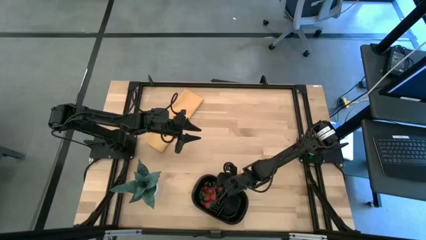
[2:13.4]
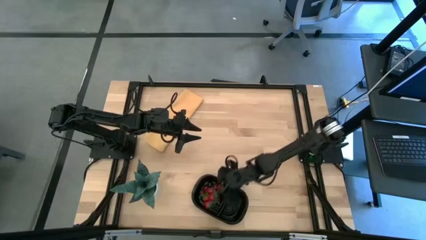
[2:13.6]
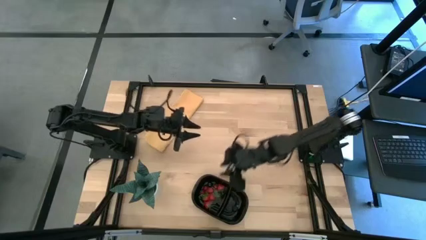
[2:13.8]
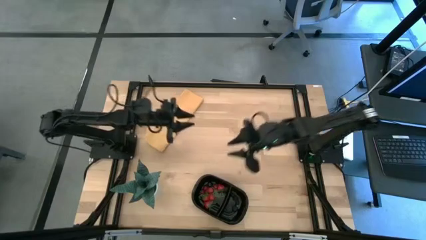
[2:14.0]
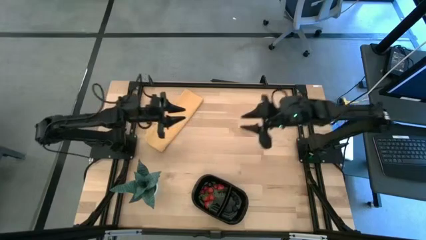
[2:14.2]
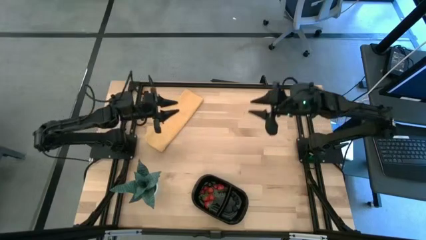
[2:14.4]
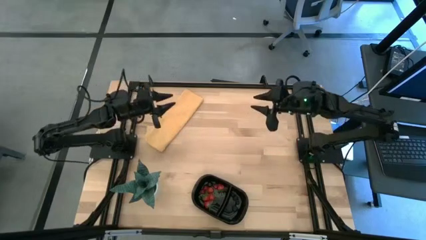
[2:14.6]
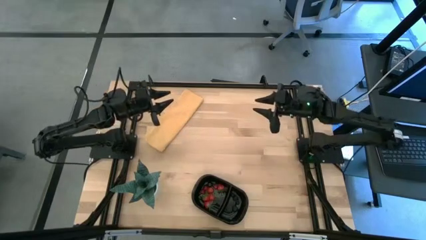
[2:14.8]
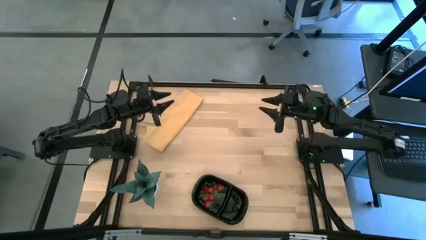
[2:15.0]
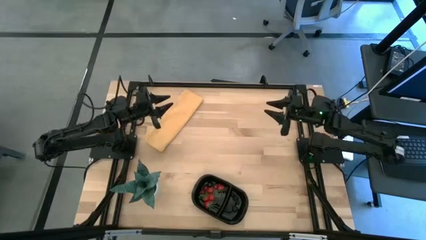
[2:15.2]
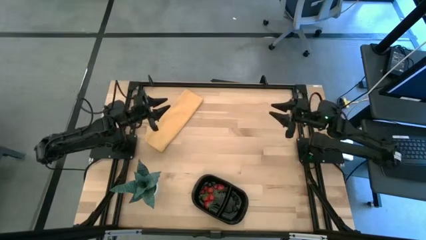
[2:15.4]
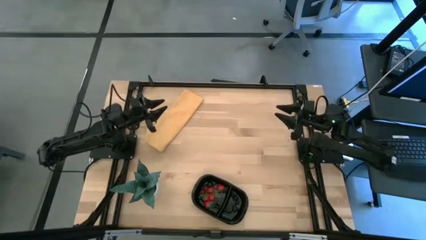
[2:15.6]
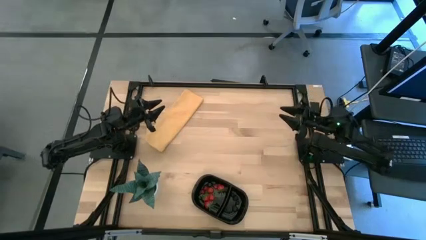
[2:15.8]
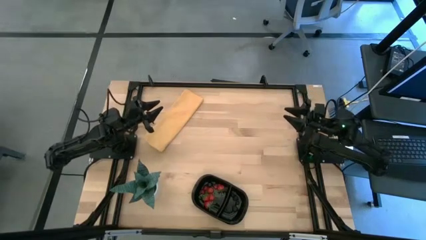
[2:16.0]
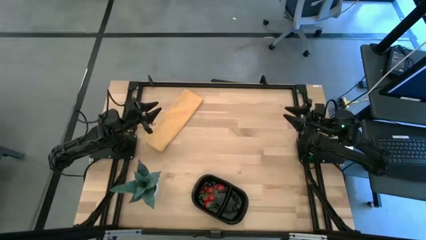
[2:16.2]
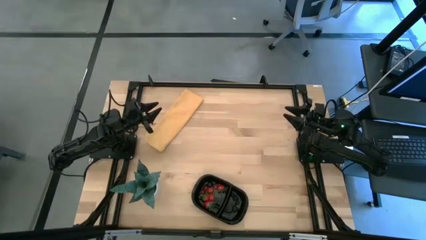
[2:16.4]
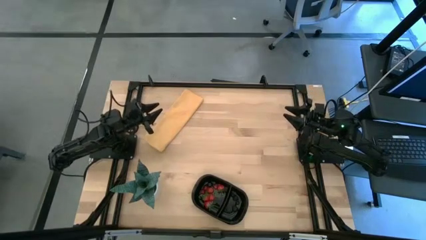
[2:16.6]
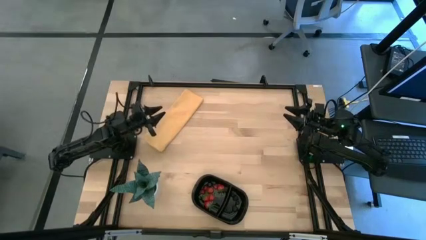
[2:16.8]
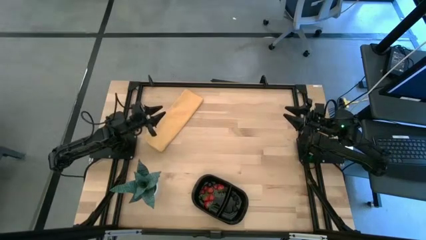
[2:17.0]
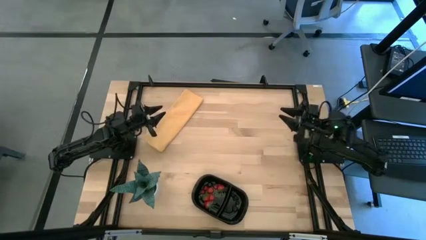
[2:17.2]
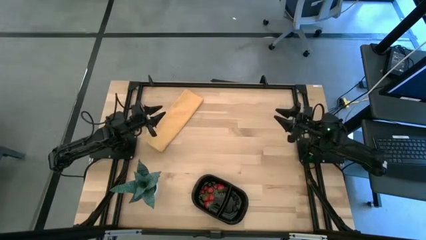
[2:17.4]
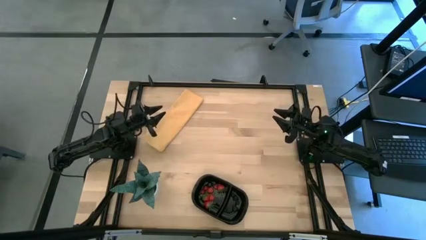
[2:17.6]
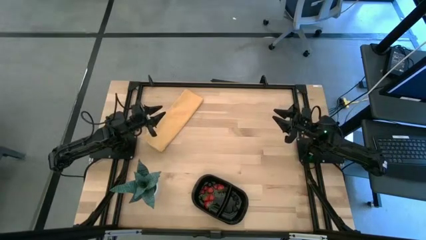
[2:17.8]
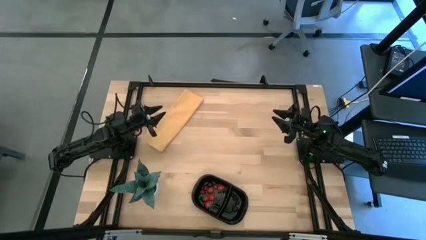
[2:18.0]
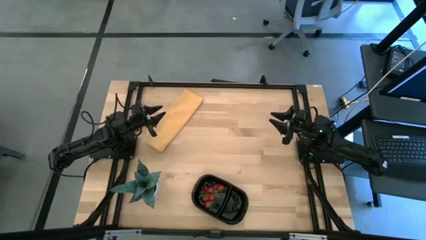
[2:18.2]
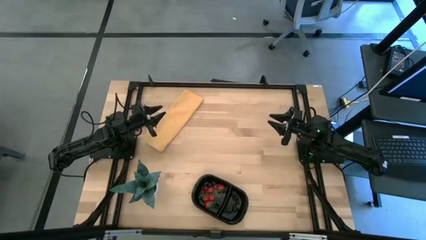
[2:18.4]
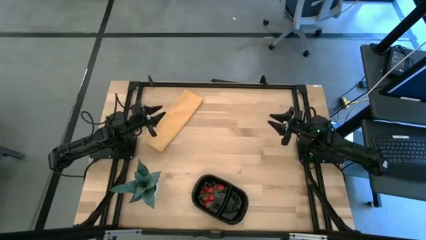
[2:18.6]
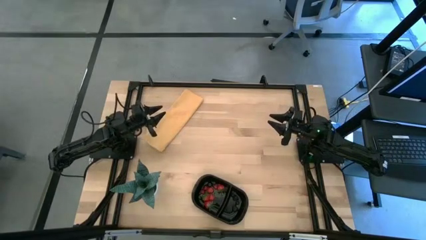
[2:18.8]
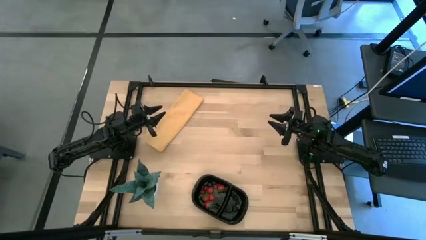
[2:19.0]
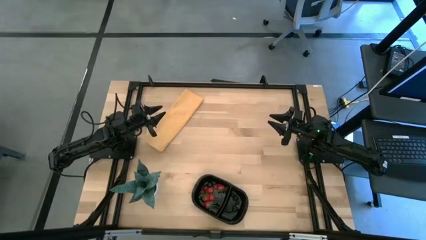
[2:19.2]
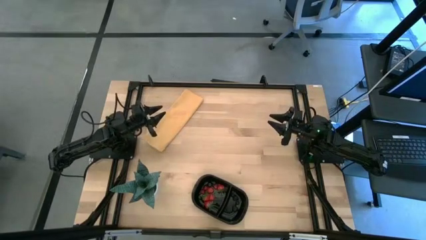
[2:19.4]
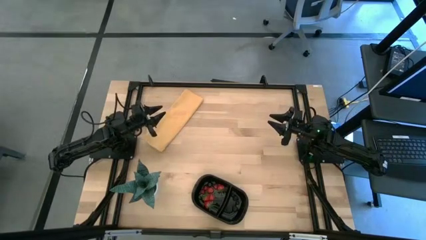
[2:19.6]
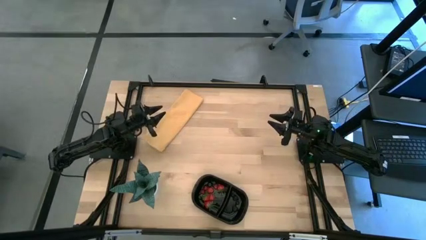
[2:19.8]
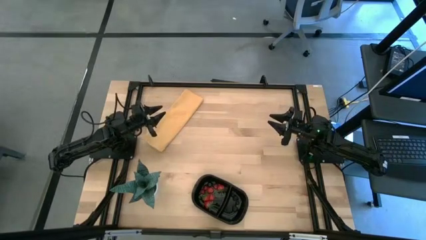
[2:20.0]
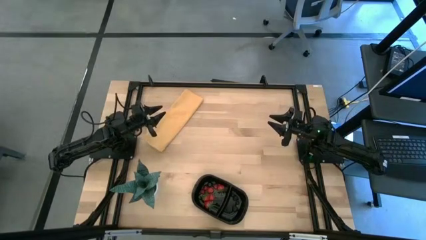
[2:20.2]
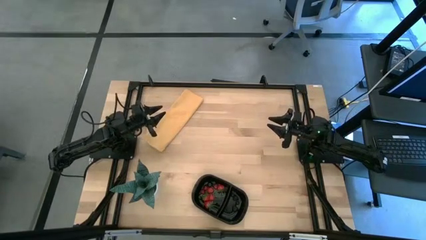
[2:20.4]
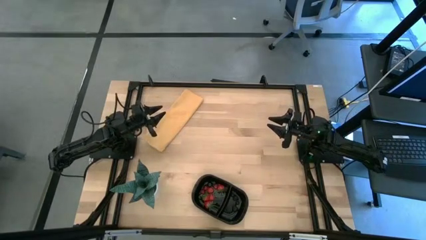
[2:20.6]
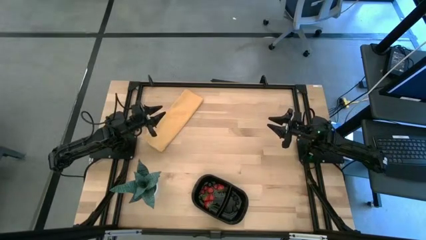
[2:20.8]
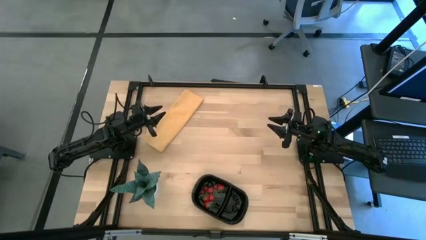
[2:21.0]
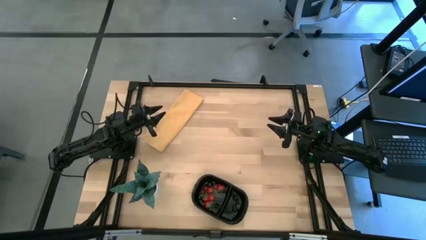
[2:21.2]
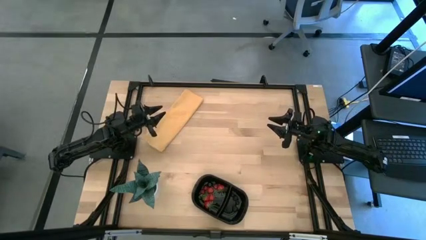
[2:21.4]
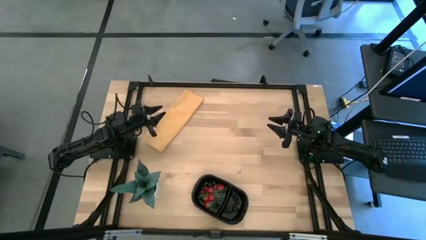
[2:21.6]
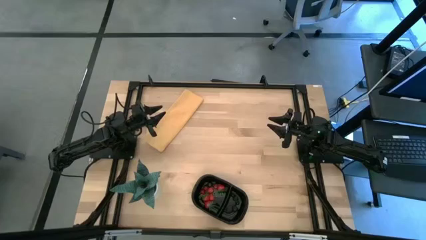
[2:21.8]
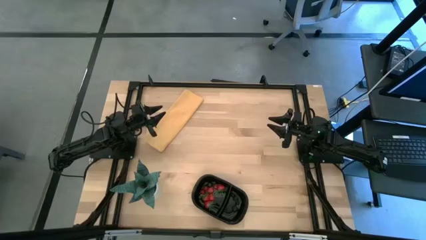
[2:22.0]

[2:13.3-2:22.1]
Task: Pick and placing Produce into tupperware
Return to Home Position

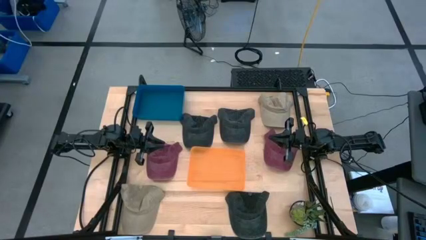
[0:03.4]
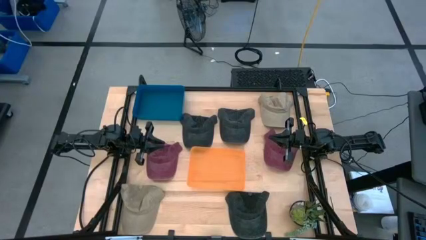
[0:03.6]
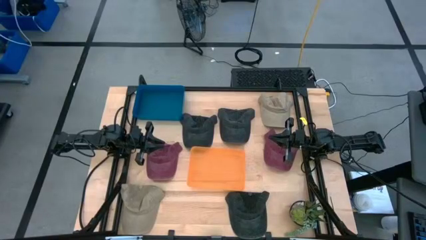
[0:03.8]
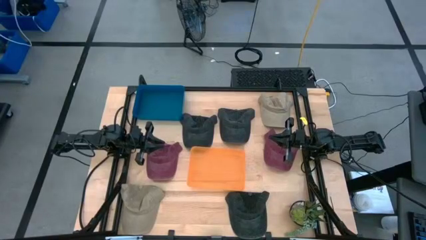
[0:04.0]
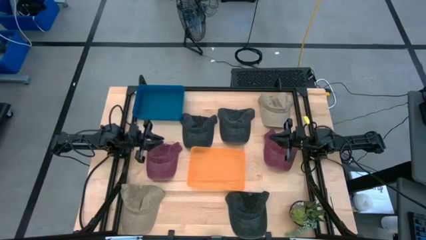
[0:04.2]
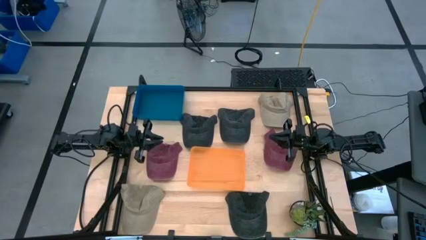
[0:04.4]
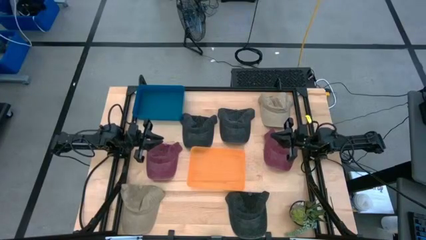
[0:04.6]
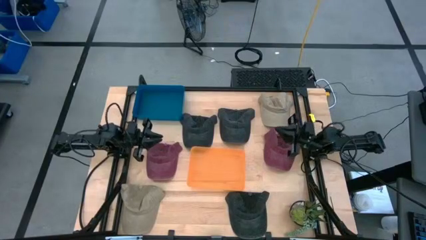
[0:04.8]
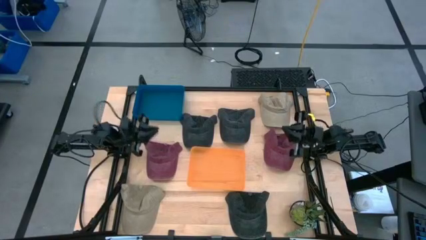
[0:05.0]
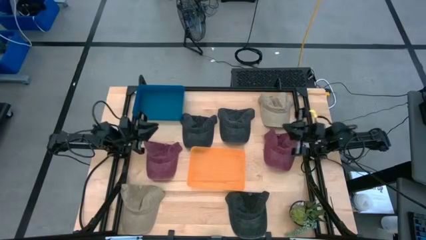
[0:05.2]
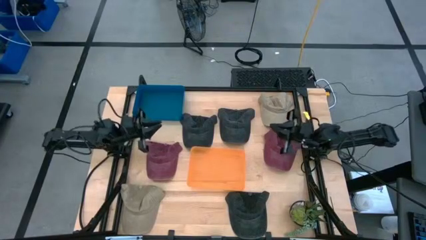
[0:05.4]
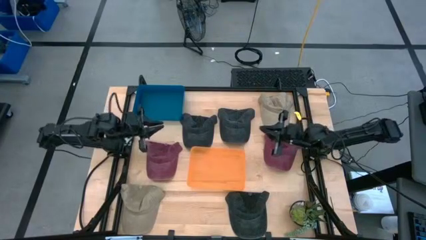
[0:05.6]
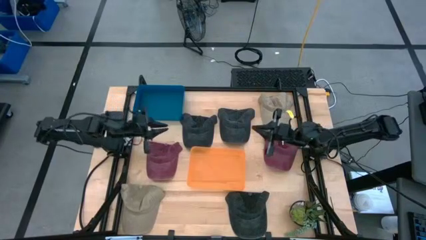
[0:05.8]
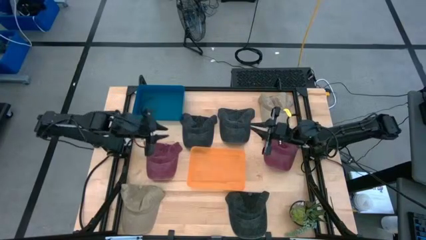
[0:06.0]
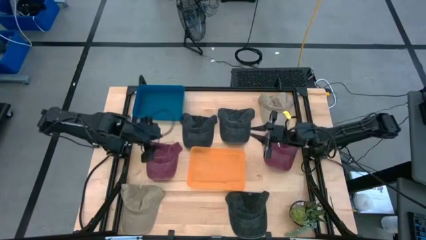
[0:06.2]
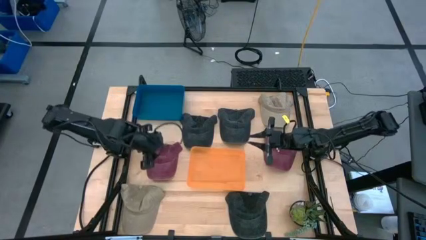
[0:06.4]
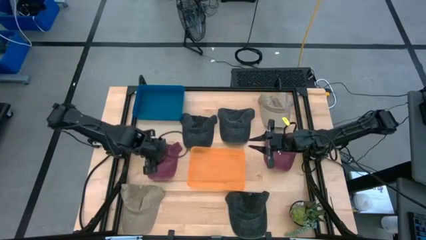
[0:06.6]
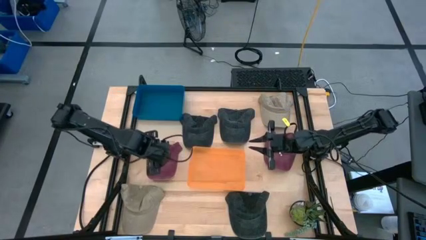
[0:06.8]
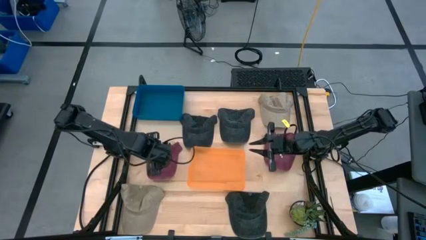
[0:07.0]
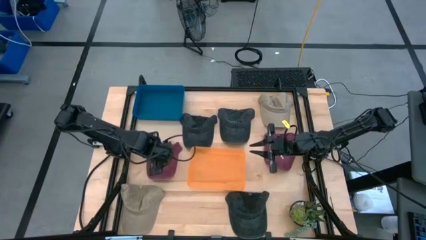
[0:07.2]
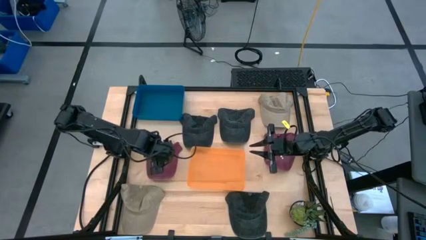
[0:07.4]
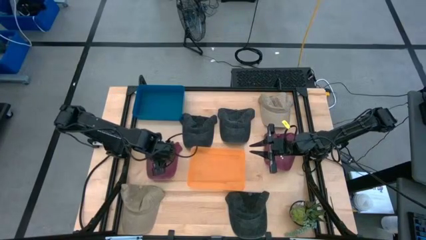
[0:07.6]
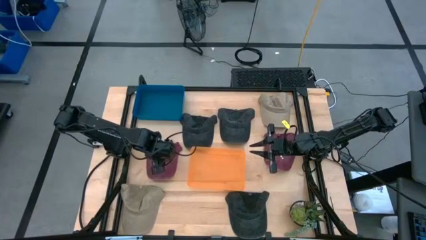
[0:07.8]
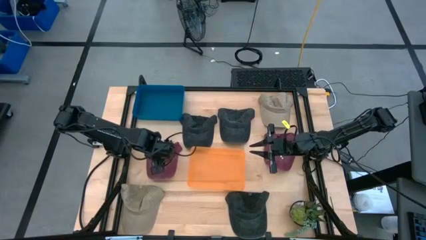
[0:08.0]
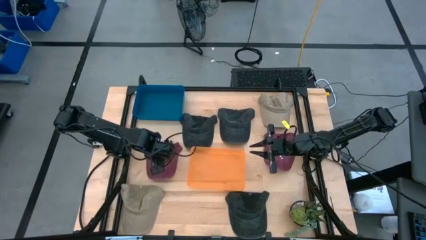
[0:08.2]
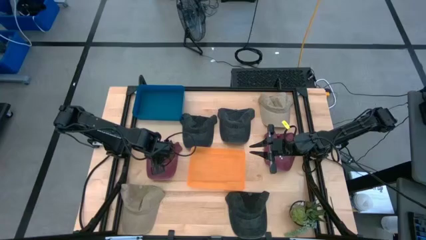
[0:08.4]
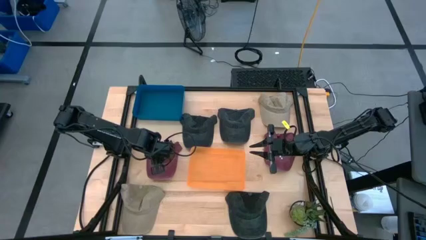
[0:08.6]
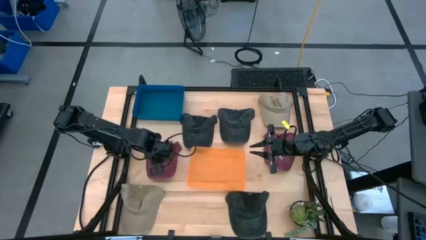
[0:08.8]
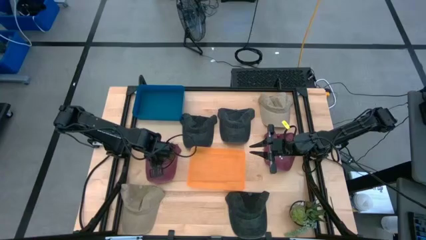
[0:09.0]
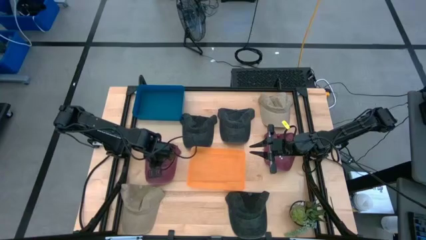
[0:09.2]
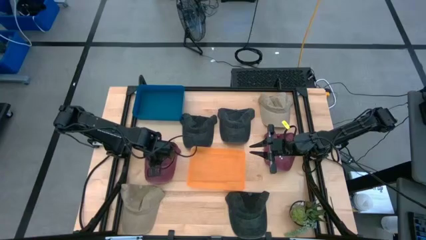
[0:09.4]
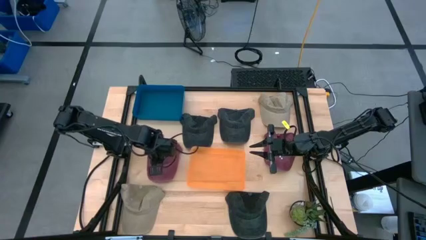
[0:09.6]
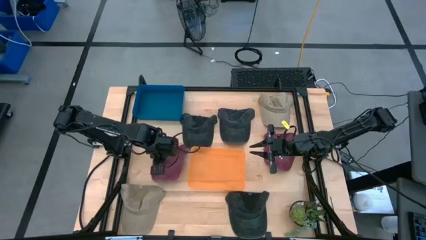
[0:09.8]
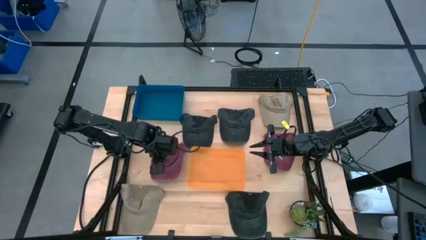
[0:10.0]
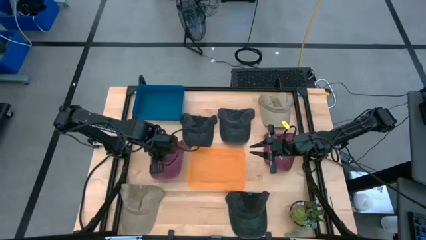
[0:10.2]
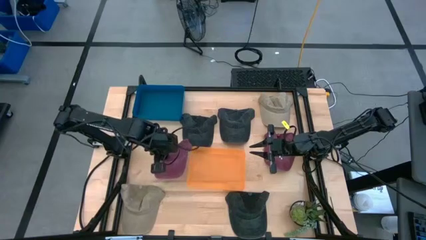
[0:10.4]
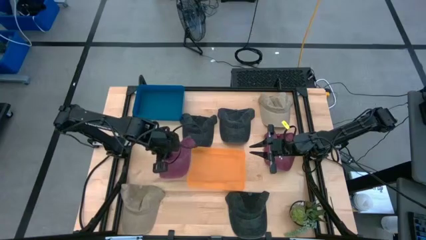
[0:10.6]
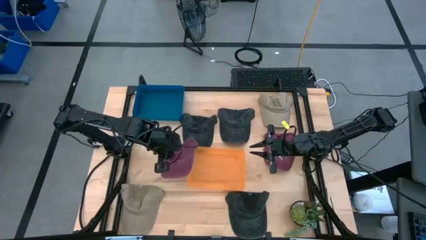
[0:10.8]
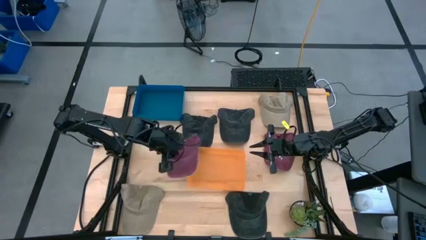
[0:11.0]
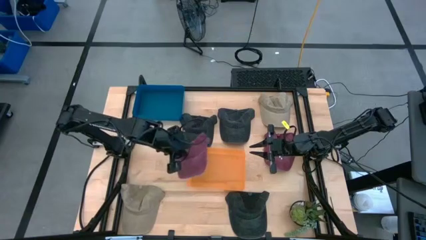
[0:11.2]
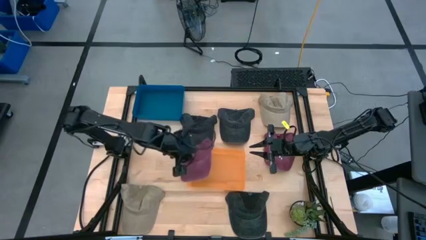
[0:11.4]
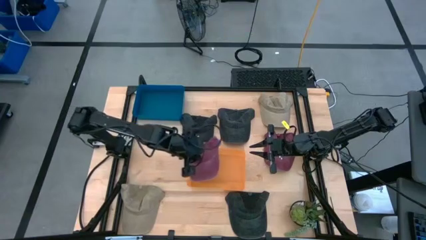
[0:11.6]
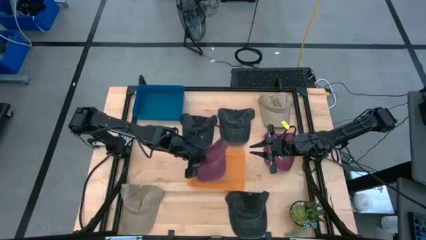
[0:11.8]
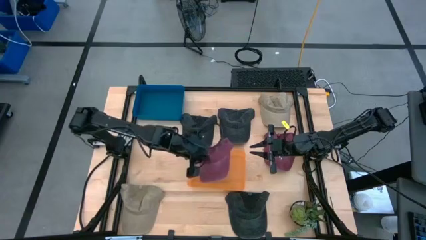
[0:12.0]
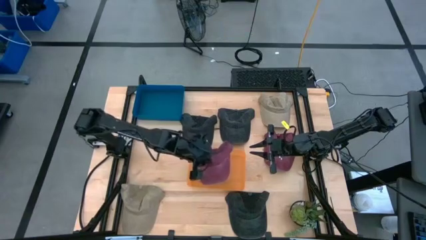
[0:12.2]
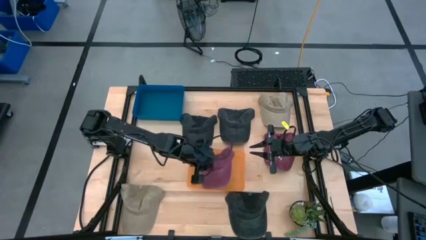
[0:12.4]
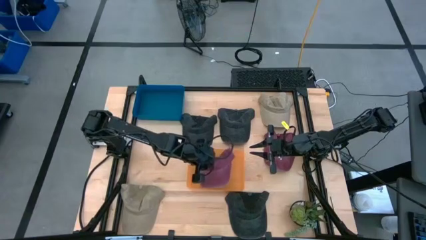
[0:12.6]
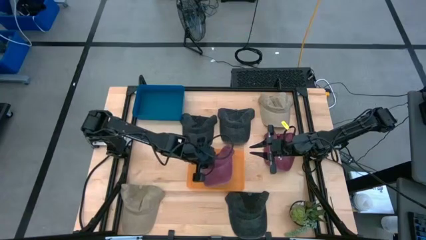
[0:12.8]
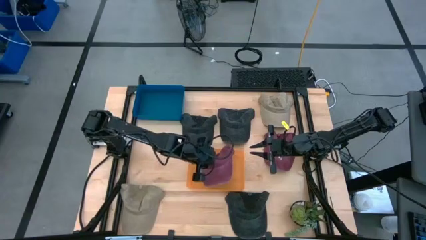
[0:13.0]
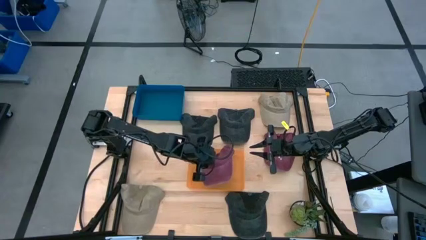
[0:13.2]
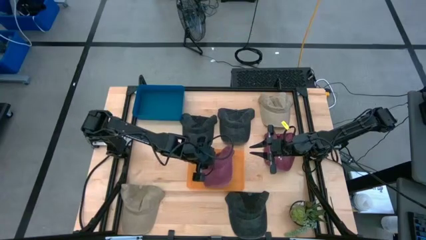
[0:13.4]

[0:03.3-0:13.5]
Task: Pick & Place hat
Put the left red cap into the orange bin
